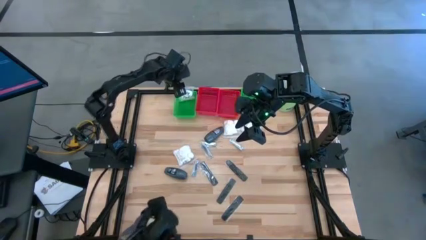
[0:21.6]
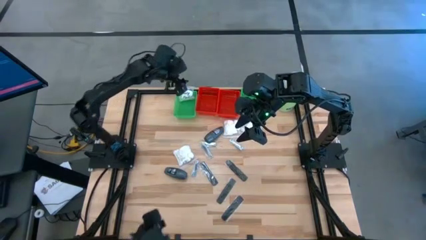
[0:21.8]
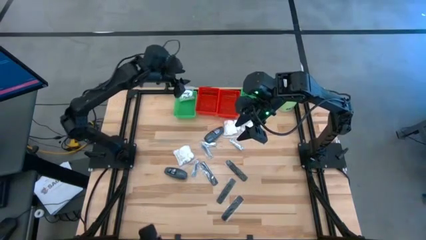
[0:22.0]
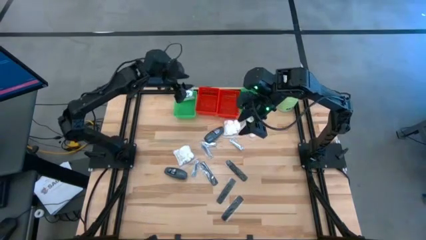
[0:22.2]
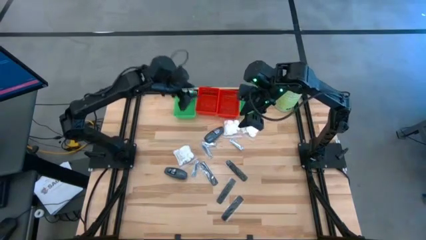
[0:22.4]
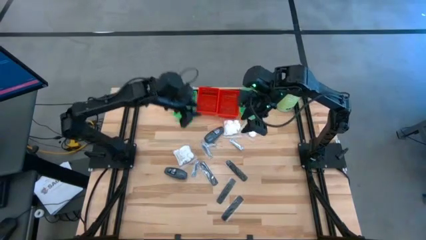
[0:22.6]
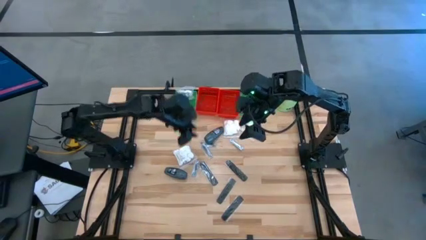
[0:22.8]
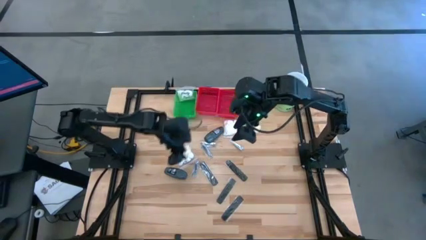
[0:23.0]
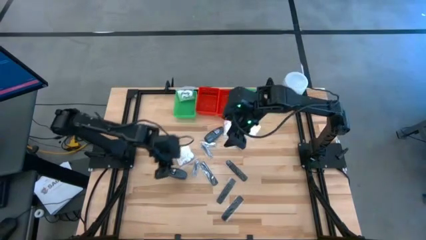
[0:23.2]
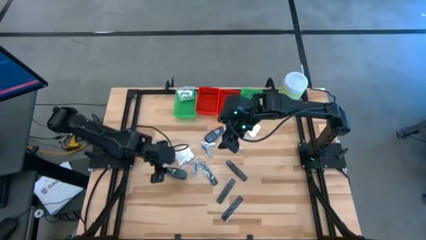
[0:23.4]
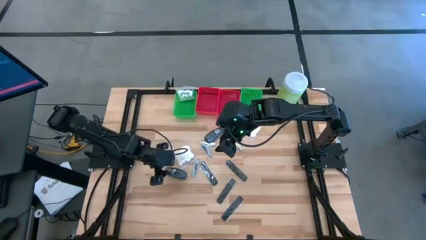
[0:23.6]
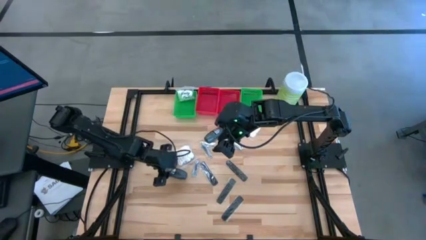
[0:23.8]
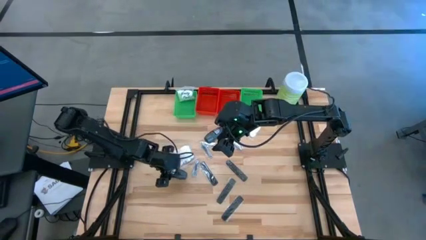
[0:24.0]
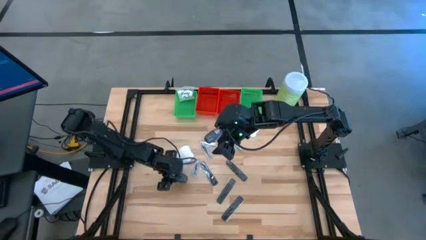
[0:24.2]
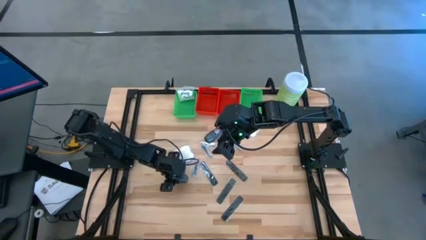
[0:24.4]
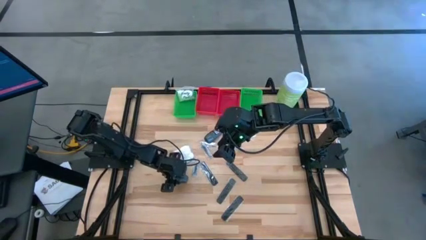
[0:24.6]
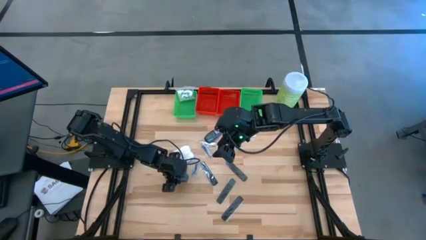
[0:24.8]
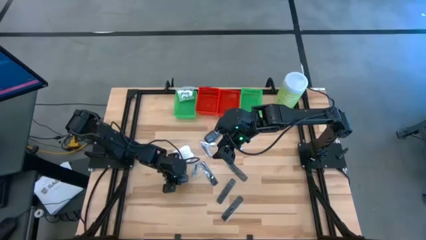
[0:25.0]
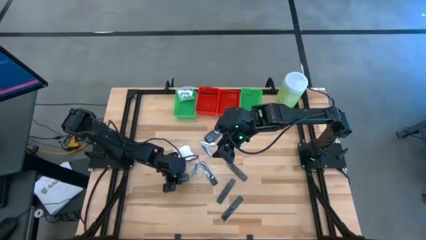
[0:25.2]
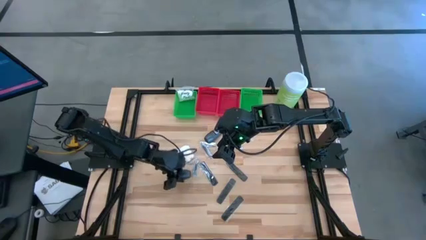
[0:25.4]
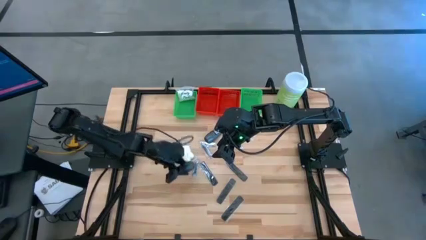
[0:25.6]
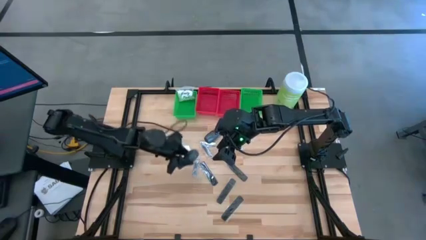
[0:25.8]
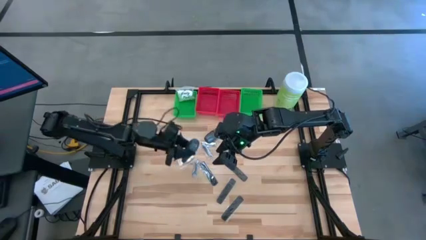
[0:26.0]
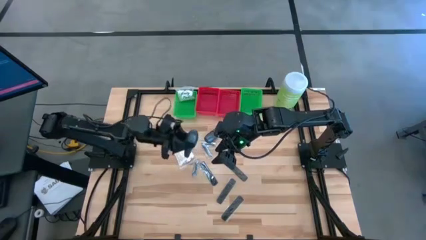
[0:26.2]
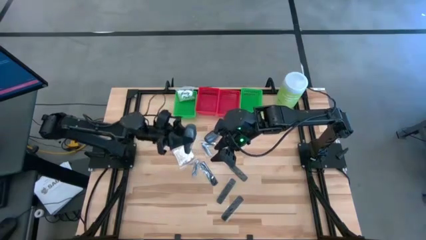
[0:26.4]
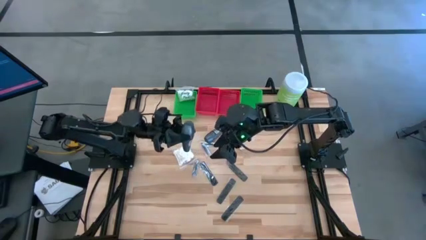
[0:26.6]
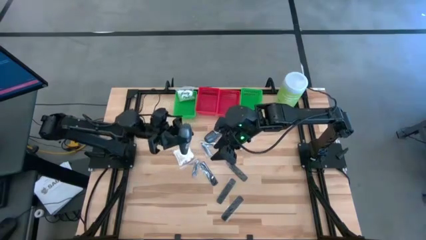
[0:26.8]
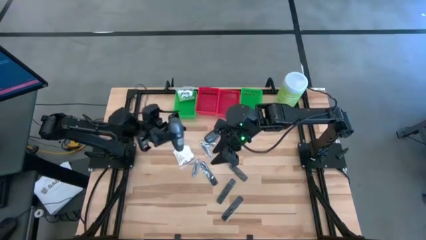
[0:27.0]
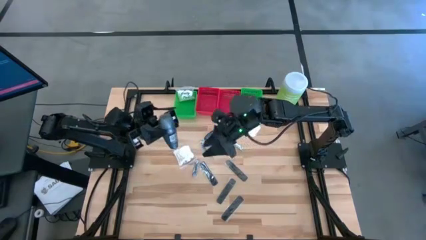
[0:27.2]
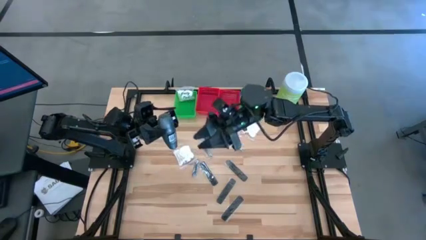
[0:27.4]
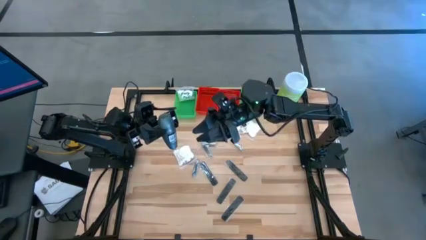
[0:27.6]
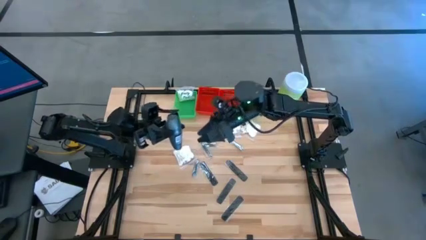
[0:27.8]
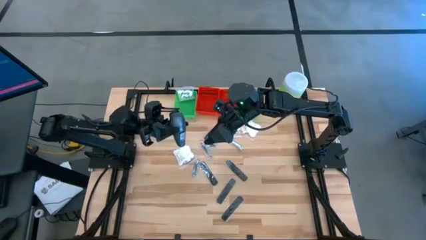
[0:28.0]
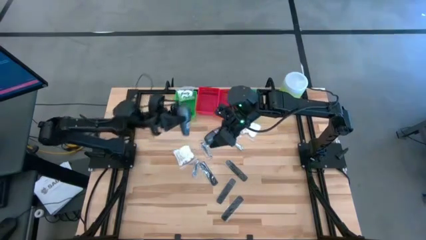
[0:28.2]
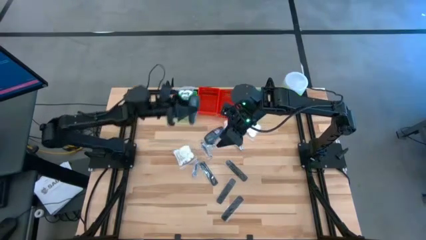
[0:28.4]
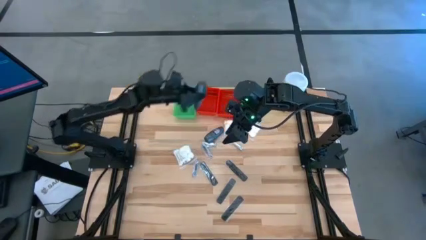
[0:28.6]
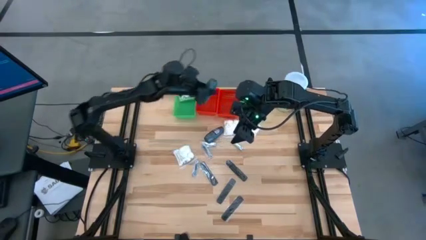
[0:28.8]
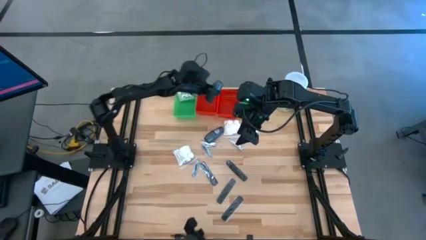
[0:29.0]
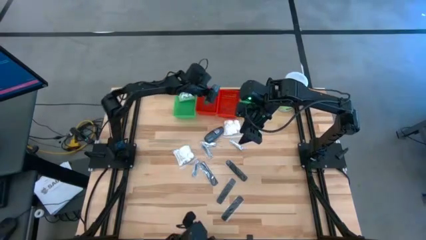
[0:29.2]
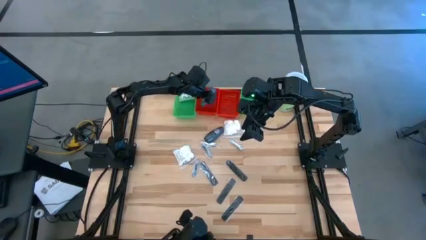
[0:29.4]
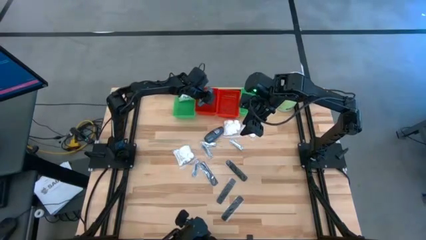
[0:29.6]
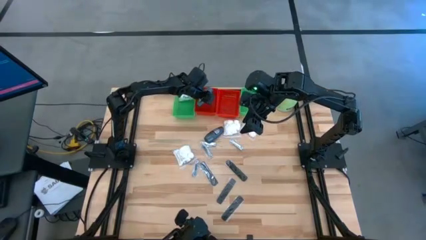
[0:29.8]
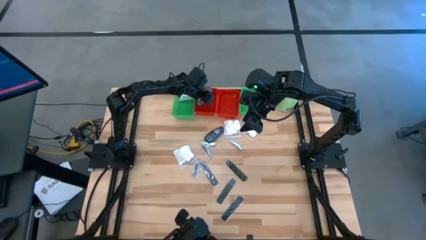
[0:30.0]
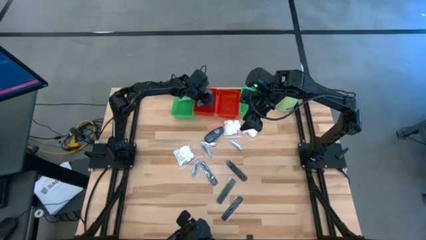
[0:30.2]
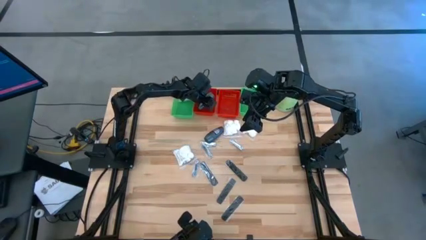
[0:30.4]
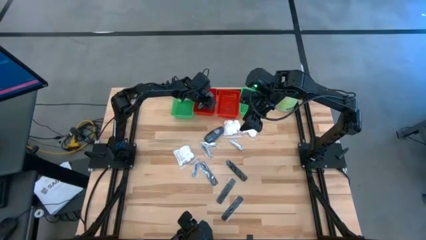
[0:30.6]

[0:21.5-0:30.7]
Task: Pick & Place Travel size toiletries
Put the deodorant into the left red basket

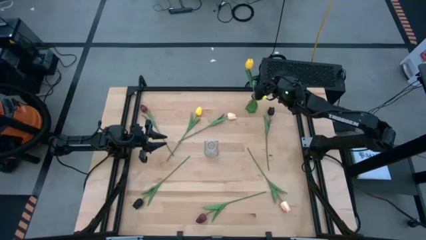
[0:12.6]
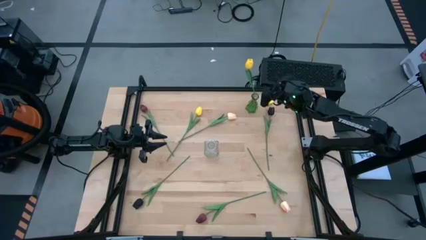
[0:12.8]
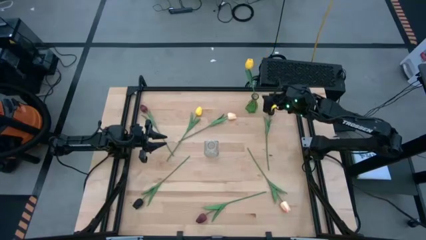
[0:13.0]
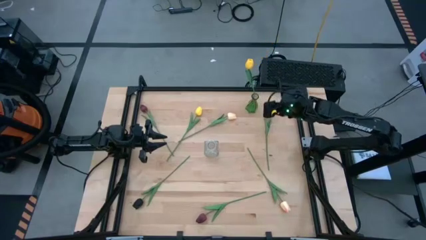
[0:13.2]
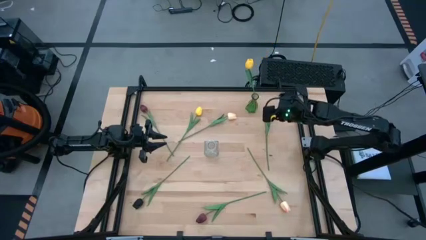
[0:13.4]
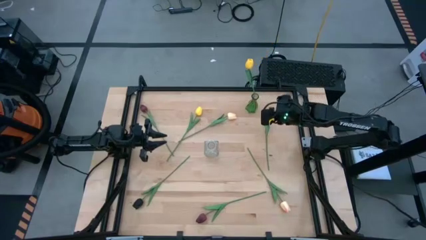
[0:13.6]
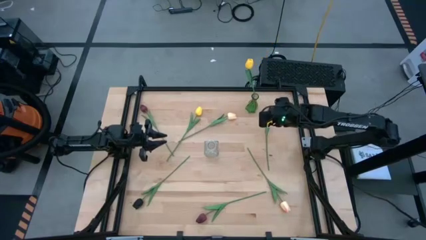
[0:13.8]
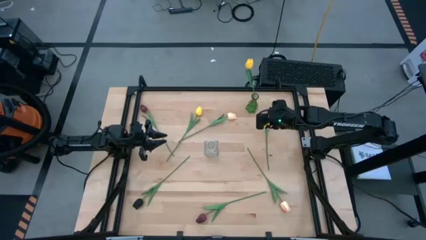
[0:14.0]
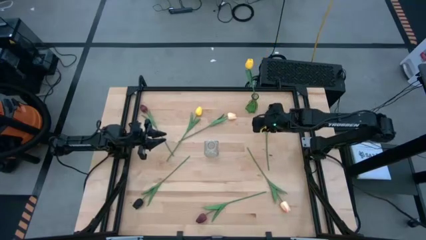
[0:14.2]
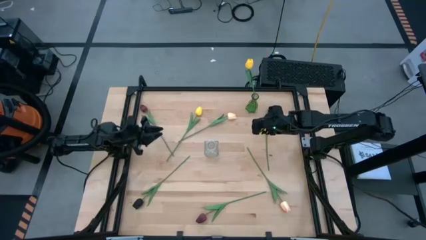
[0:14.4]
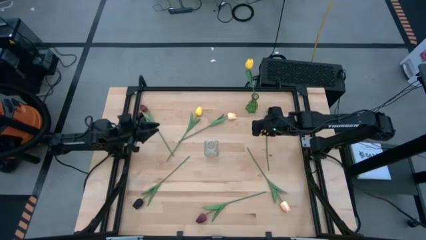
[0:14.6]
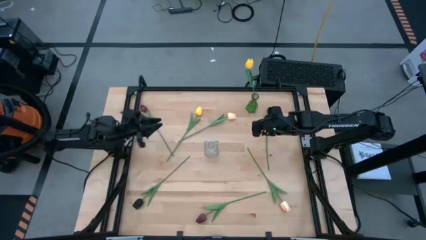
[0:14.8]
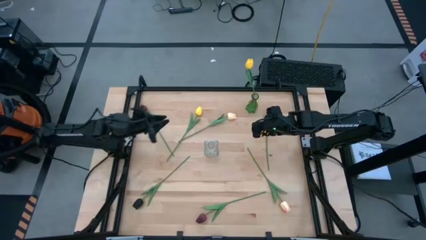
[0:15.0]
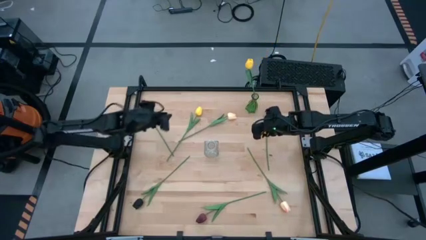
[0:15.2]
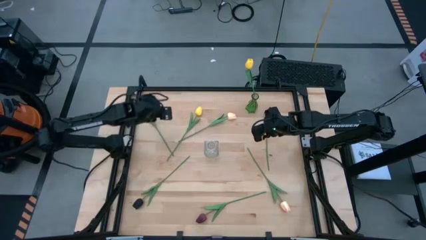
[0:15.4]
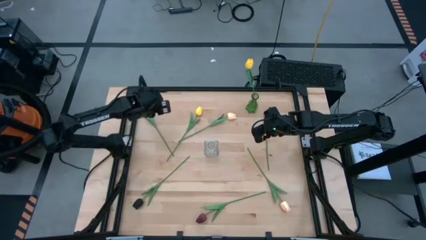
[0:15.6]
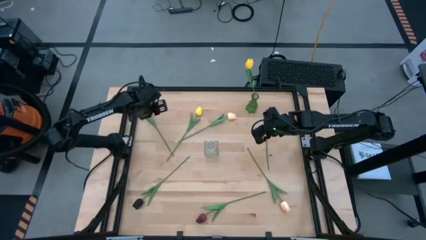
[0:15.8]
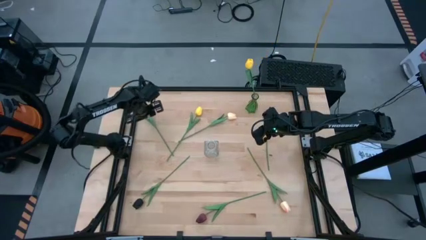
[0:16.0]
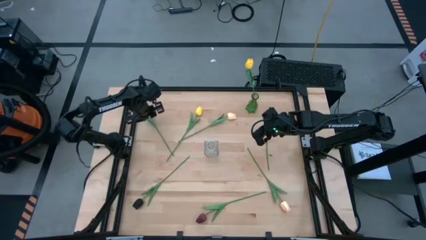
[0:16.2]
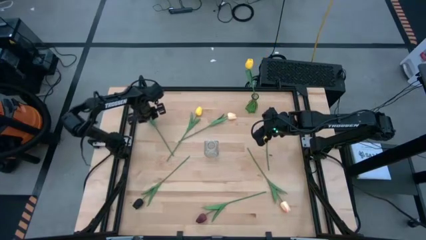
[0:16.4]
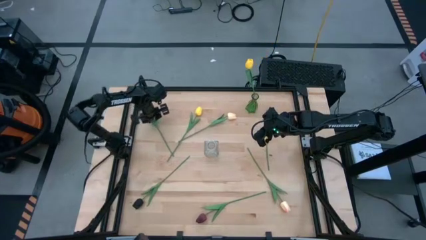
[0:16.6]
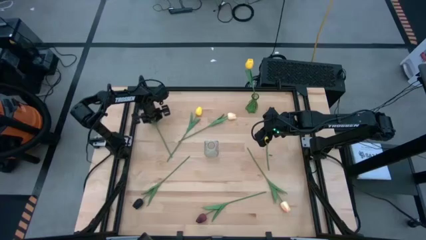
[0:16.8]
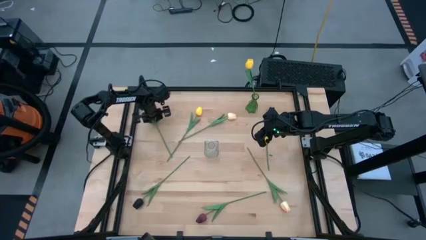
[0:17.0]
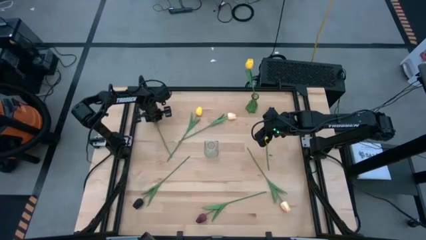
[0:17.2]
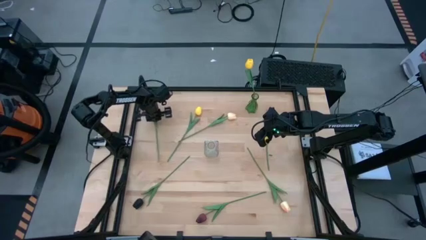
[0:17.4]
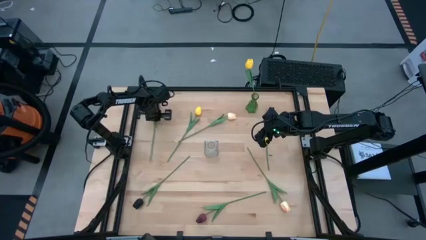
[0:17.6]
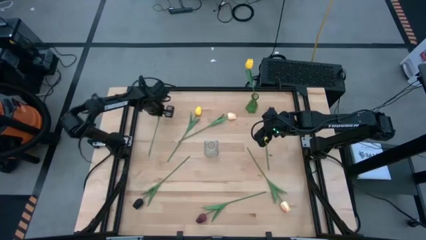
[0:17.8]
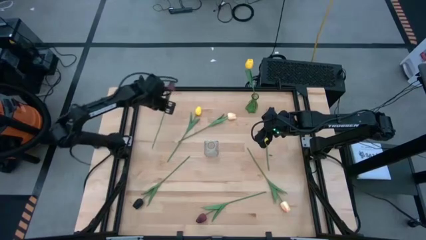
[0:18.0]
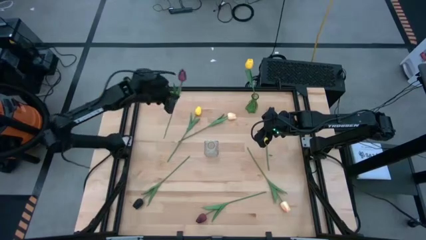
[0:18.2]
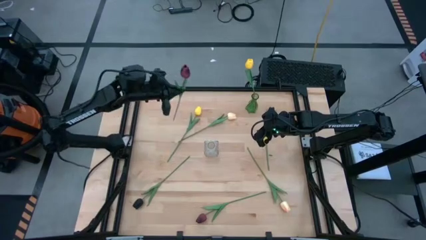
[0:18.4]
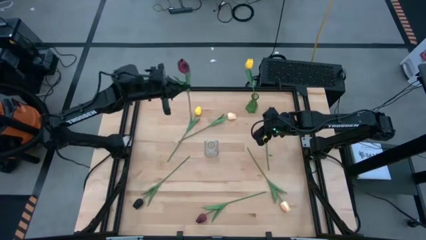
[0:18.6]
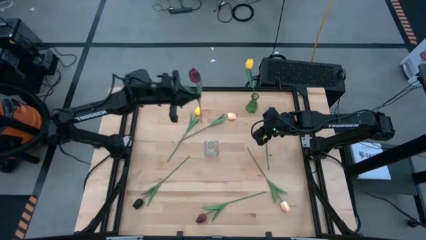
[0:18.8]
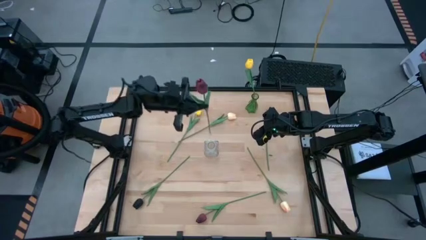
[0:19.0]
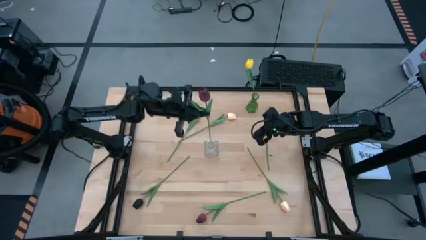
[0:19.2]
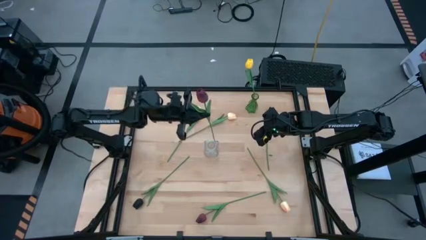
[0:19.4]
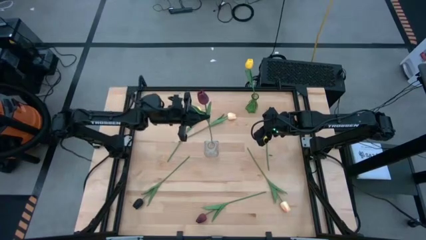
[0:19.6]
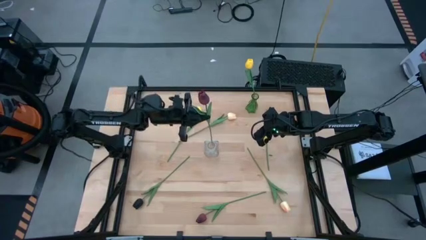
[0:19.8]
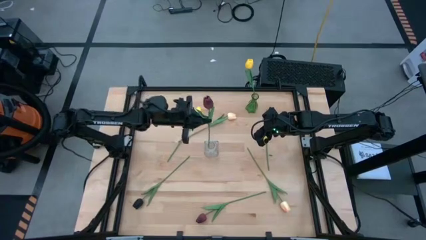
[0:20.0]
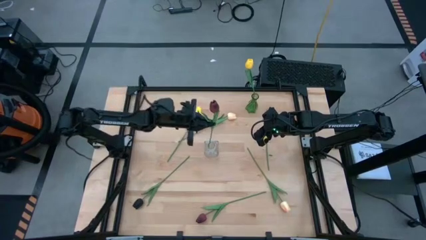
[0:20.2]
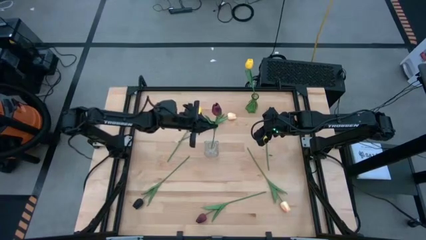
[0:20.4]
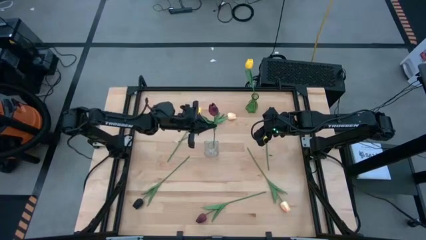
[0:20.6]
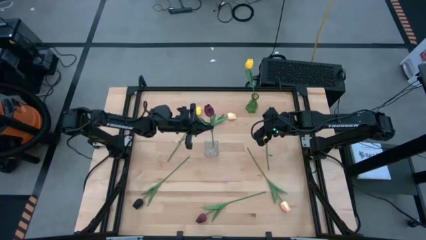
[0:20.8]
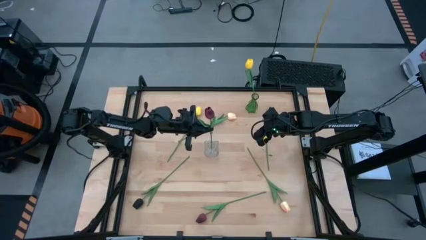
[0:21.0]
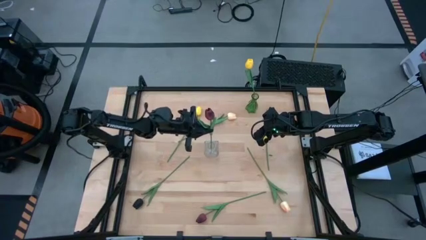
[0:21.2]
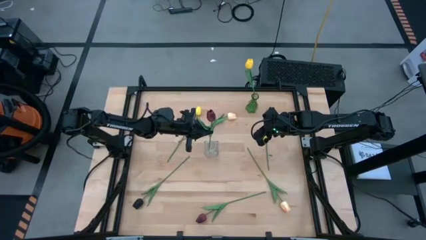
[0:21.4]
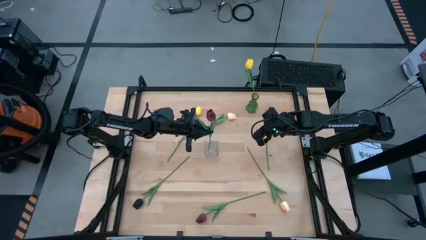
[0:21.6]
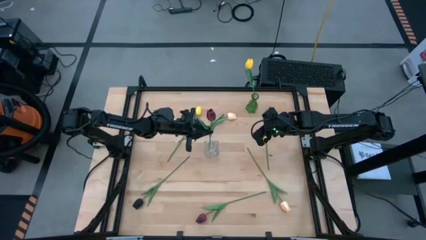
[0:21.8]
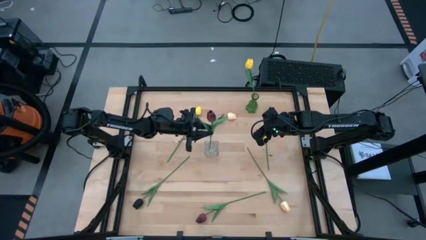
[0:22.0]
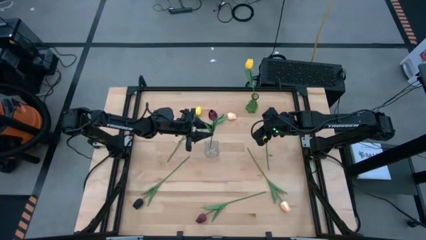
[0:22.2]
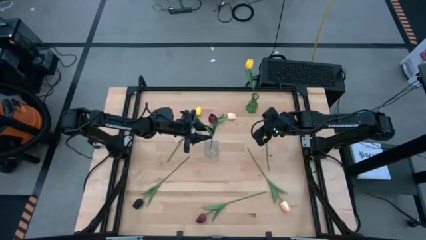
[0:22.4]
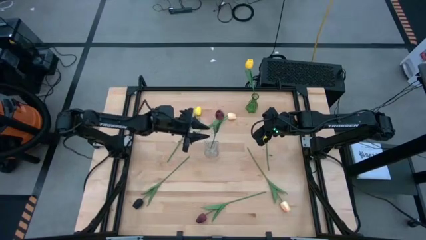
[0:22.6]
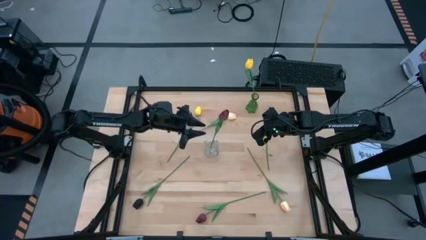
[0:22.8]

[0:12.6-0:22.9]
Task: Sort flowers into vase by color
Put the top dark red tulip into the transparent vase
